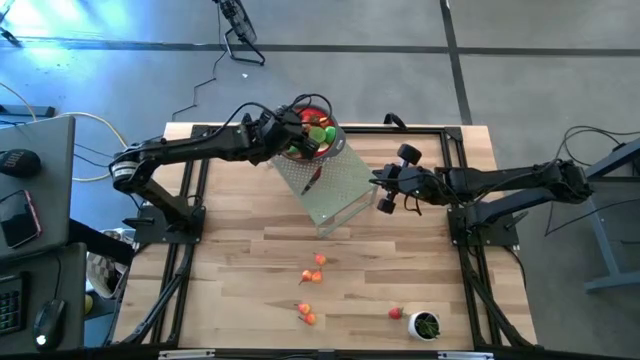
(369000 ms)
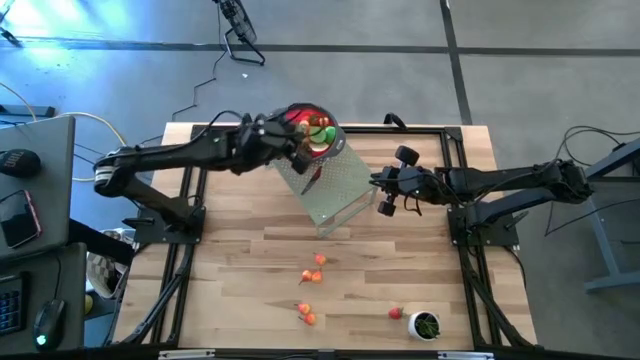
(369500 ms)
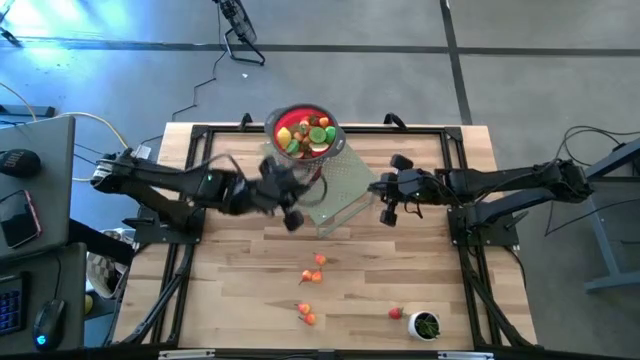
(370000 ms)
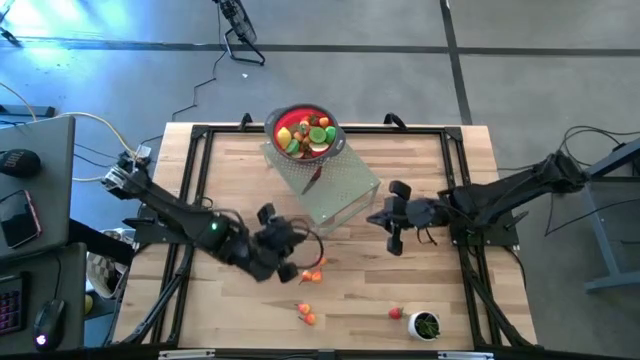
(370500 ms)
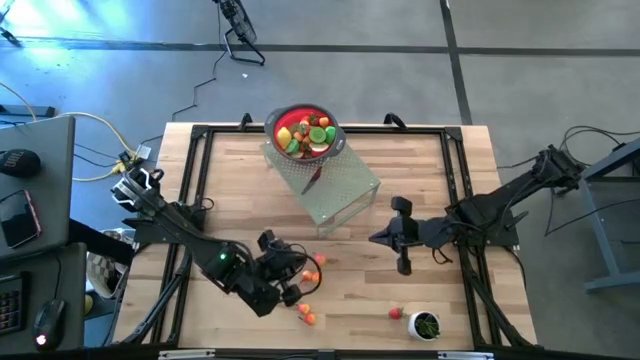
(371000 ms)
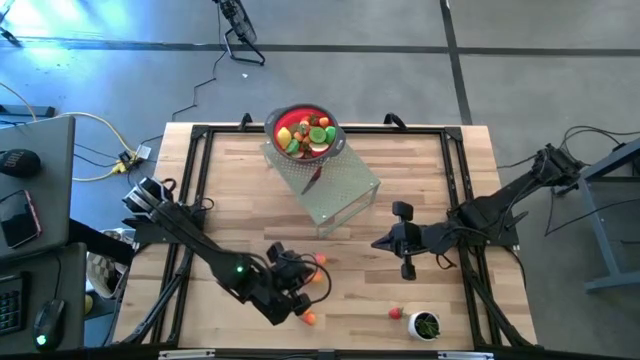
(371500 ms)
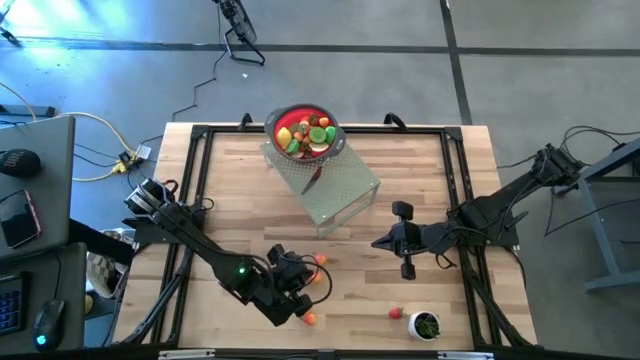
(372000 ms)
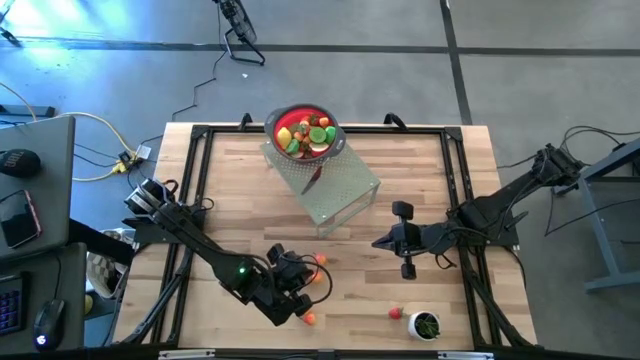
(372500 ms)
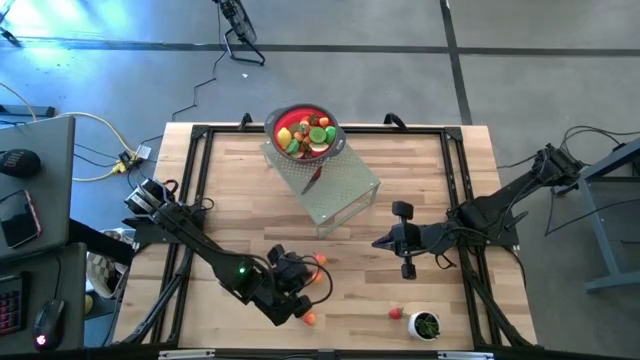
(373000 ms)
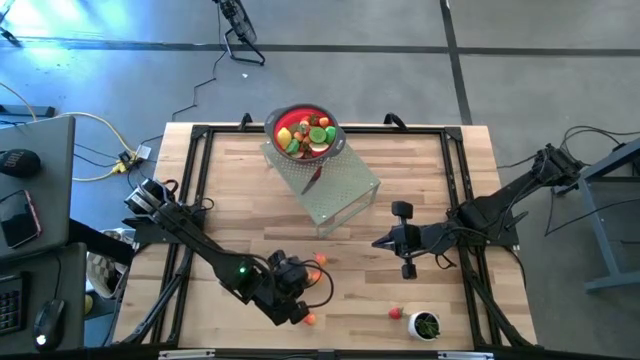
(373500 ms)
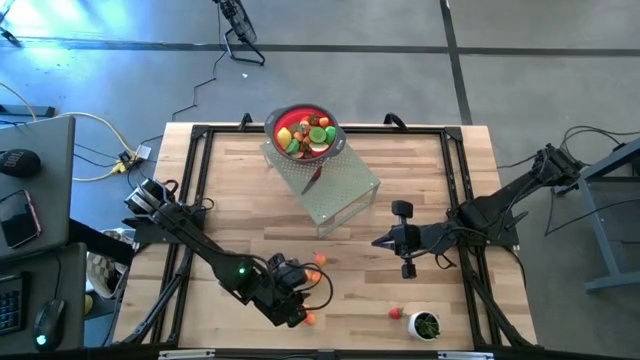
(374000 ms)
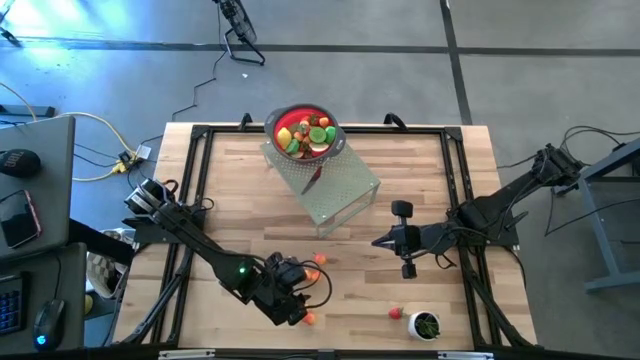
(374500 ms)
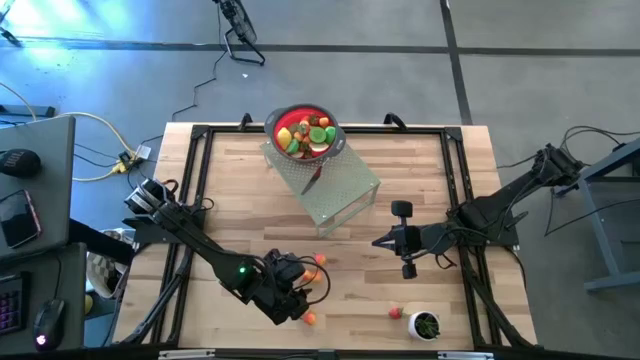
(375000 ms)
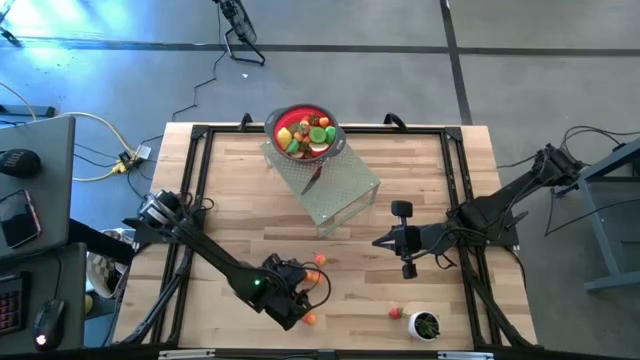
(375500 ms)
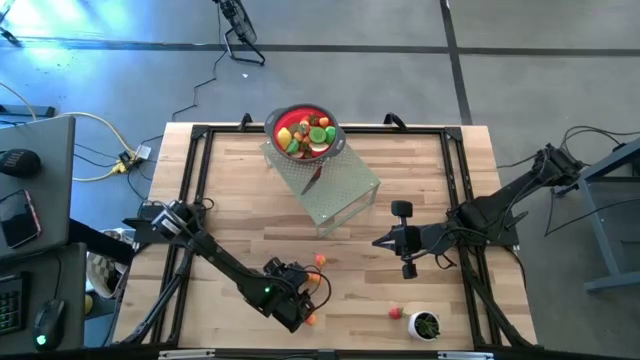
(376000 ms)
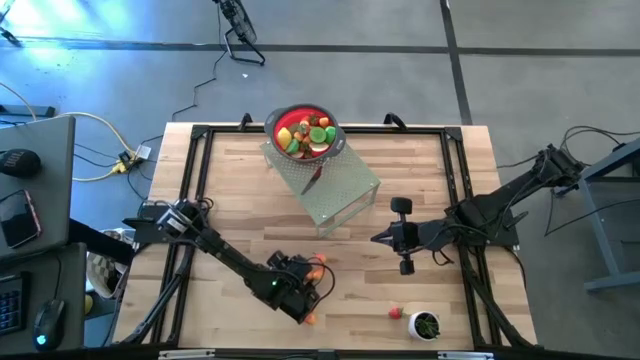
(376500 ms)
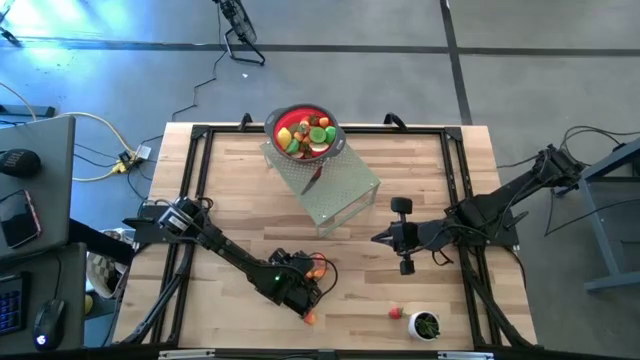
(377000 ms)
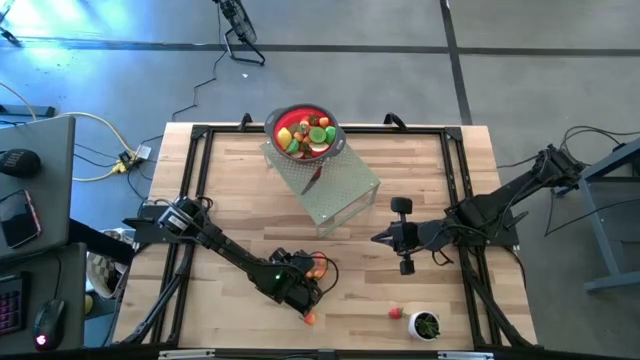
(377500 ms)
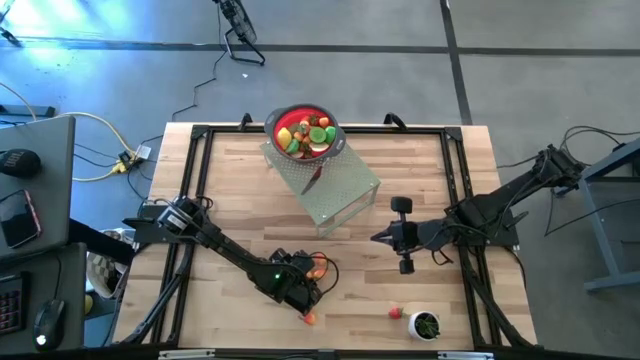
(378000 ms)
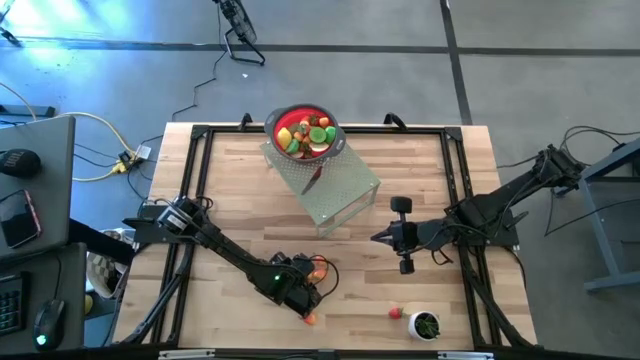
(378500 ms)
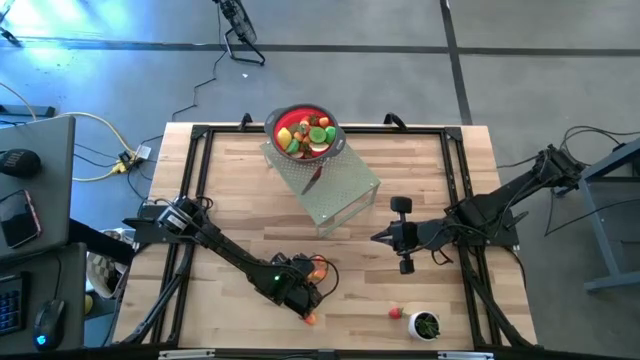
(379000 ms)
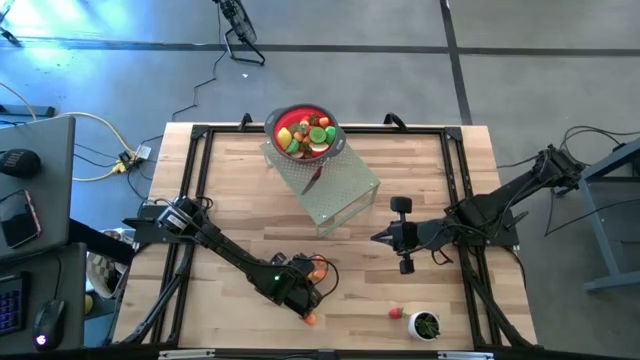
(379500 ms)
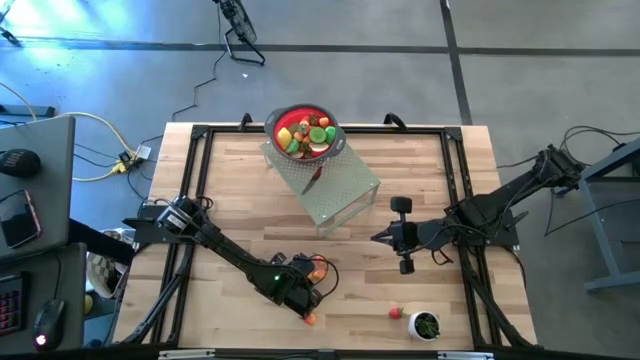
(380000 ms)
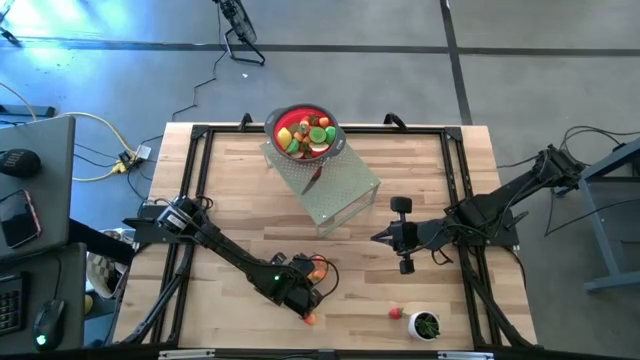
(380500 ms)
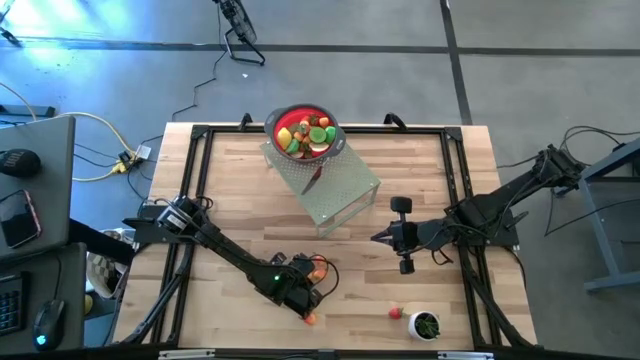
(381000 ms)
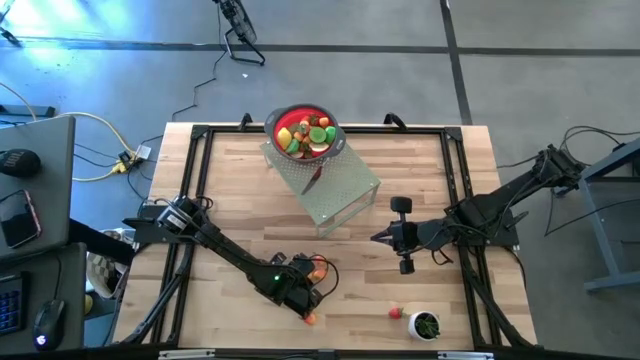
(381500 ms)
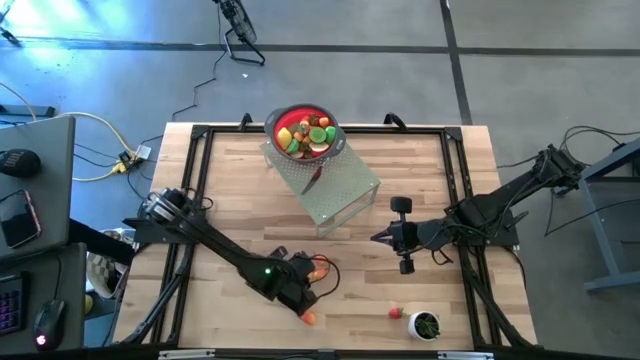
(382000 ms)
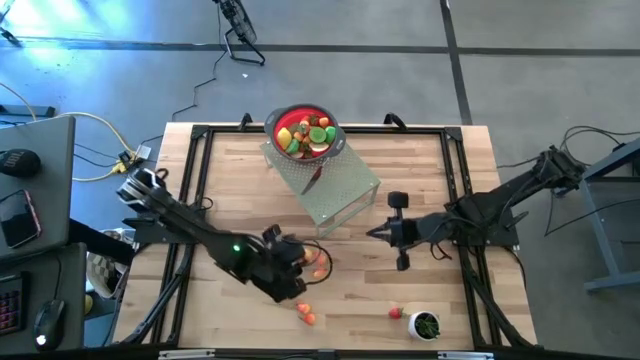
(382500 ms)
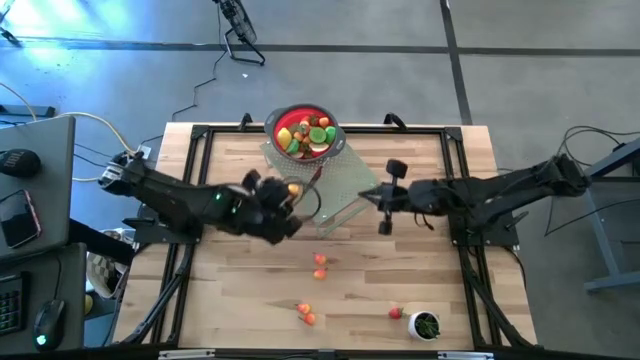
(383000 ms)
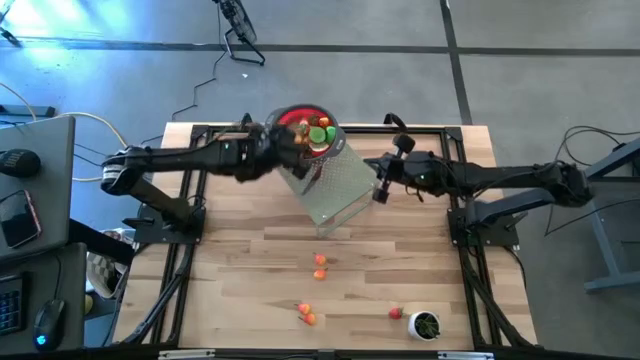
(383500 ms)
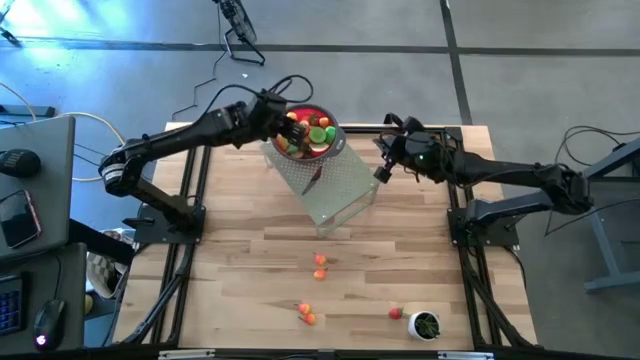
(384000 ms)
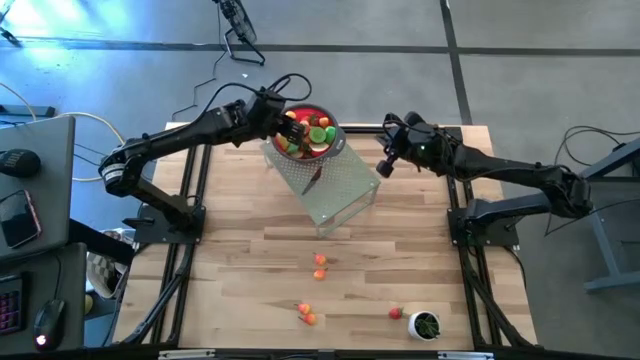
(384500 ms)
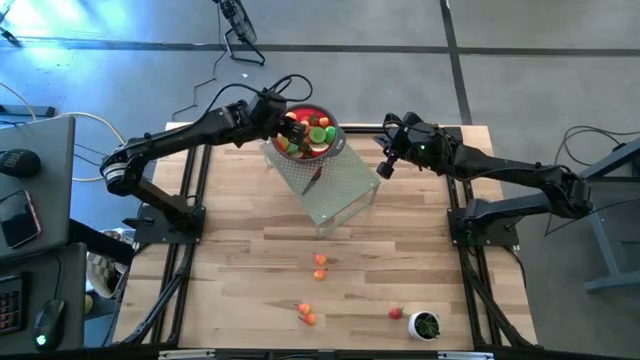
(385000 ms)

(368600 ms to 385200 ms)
Task: Pick & Place Fruit
Put the orange pear into the red strainer on the shelf

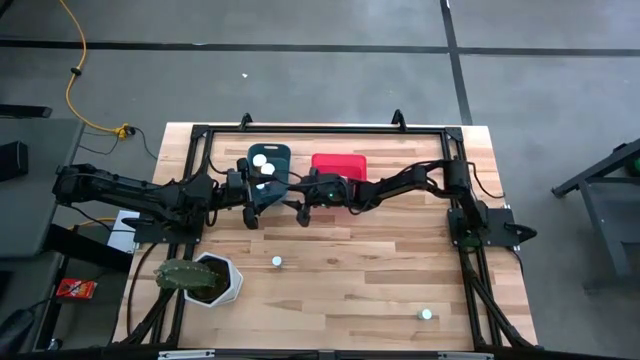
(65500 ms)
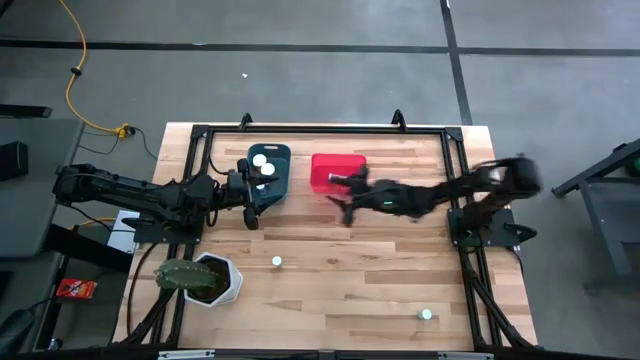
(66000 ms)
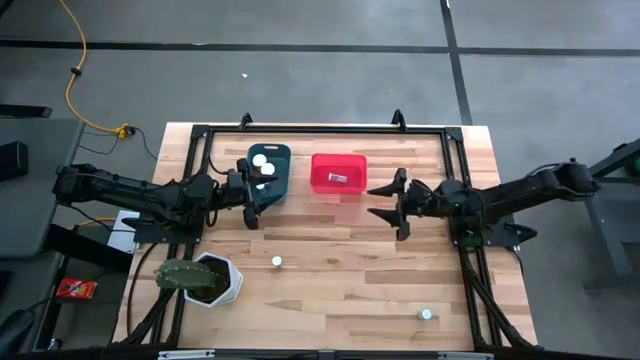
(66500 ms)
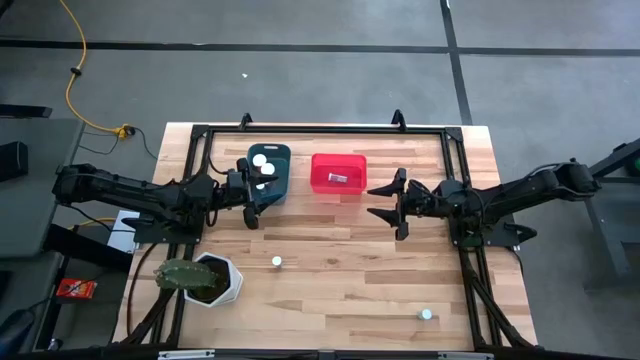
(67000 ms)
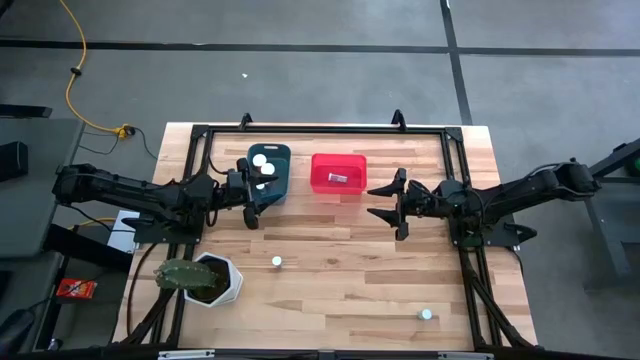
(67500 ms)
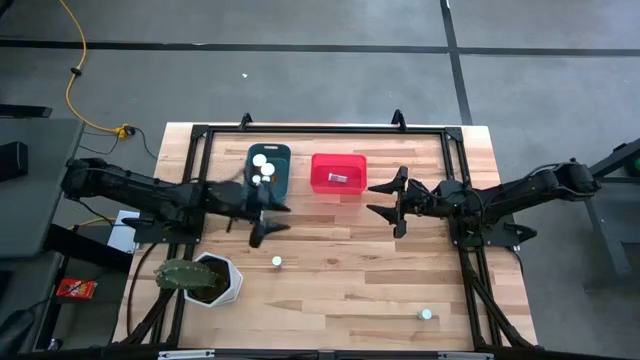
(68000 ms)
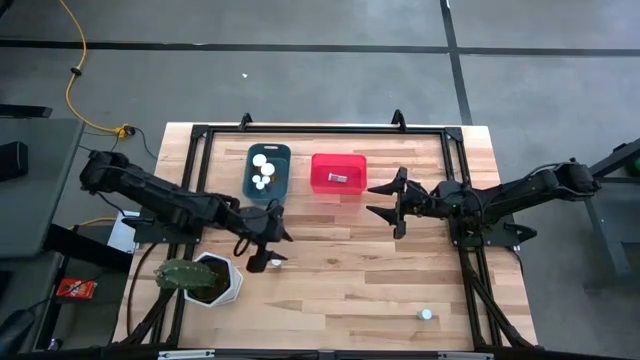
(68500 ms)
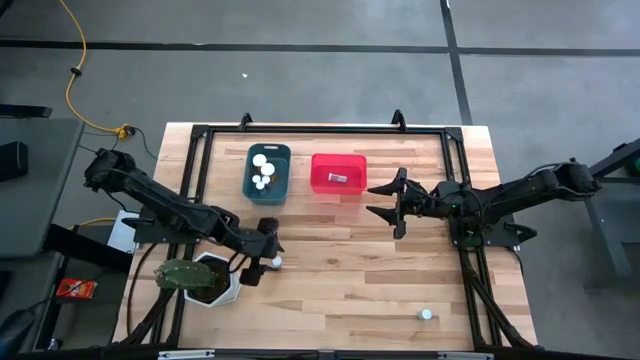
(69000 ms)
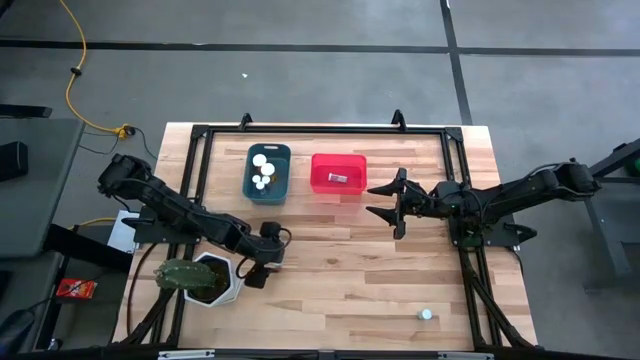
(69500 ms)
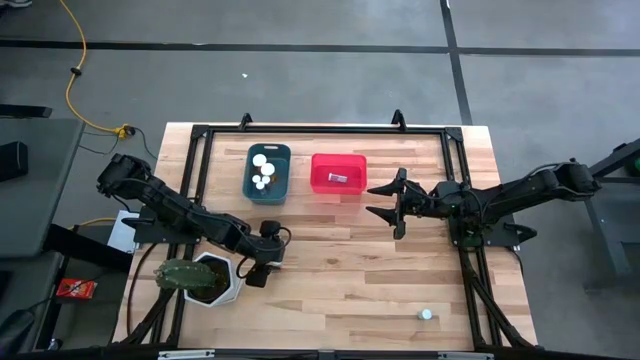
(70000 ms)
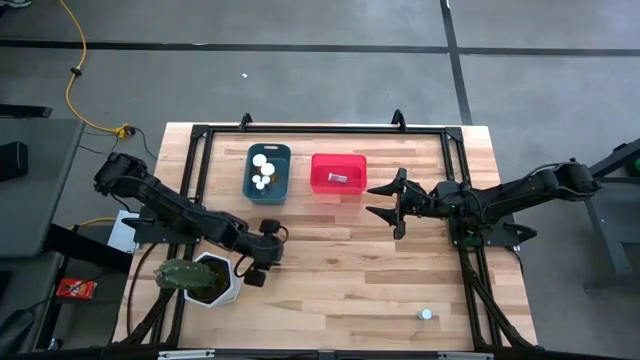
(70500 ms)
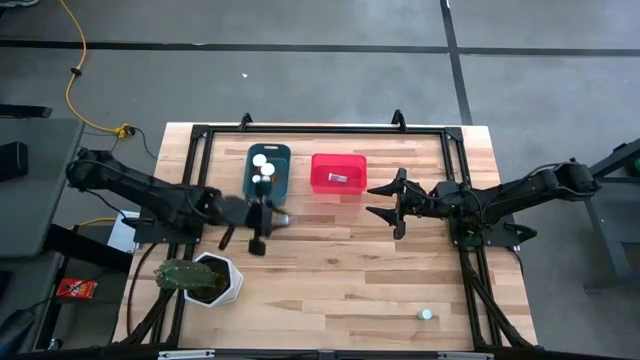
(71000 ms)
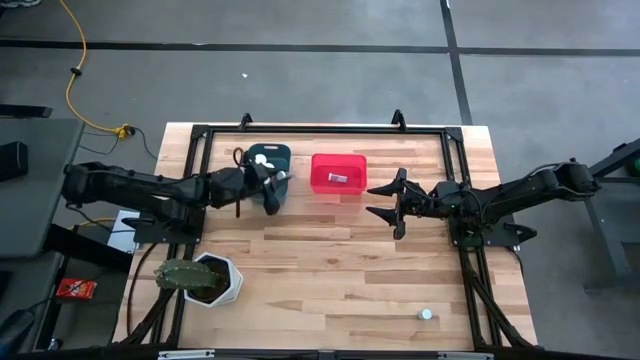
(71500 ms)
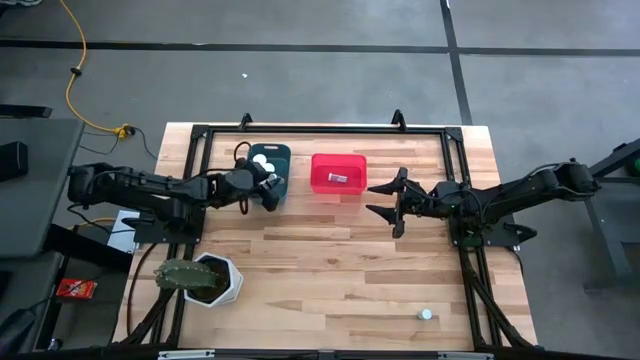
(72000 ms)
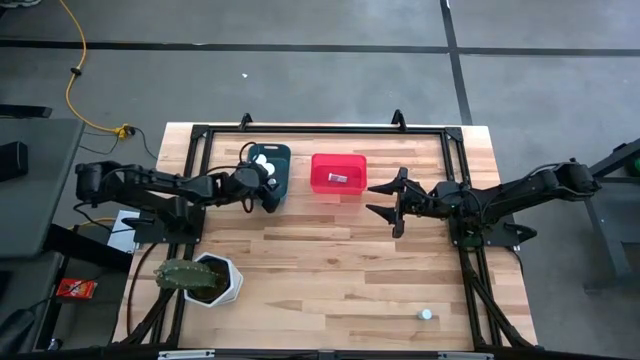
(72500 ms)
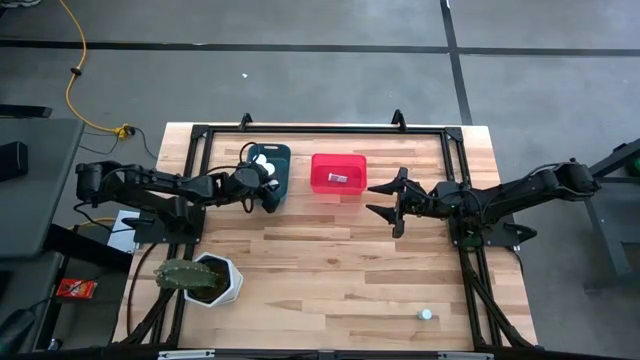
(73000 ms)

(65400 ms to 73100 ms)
Task: Pick and place medicine bottles into bin by pill shape (circle, oval)
Put the blue capsule bottle into the blue bin
